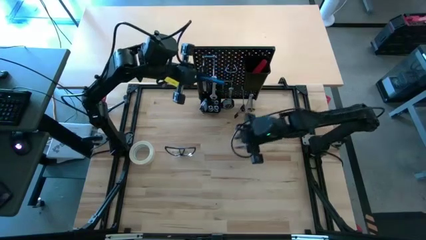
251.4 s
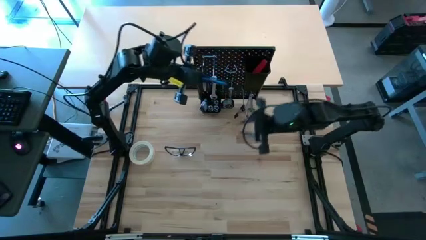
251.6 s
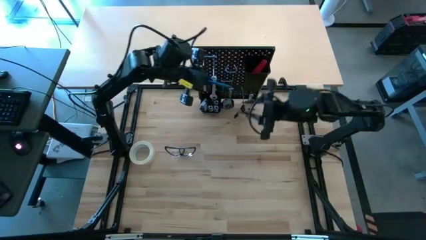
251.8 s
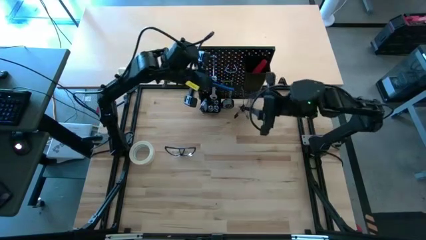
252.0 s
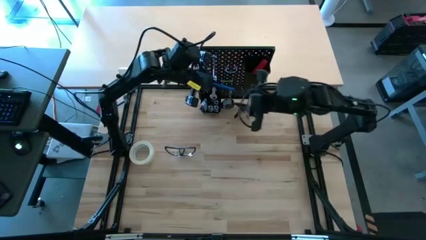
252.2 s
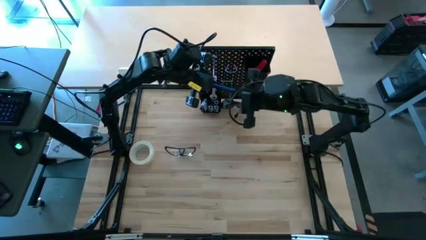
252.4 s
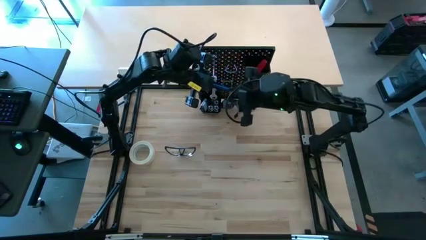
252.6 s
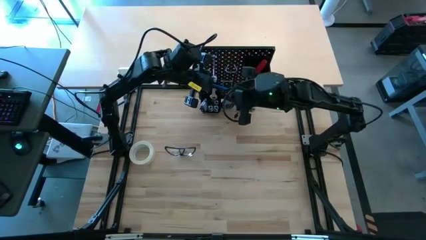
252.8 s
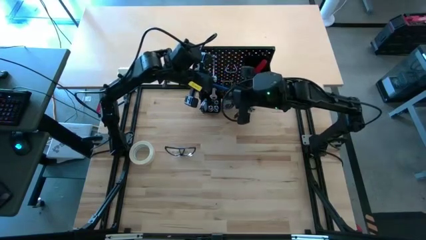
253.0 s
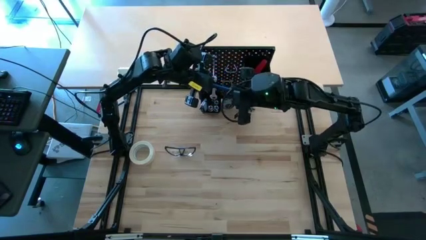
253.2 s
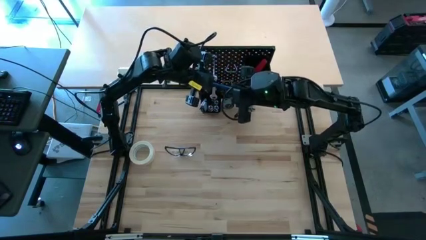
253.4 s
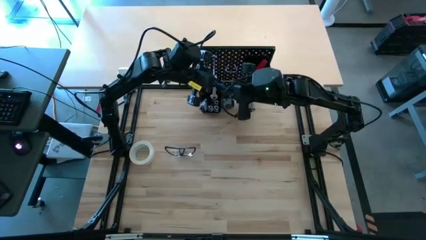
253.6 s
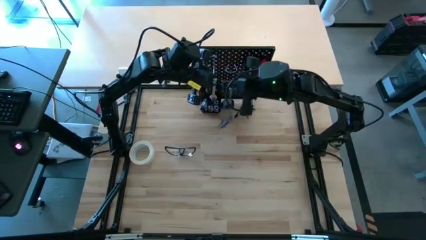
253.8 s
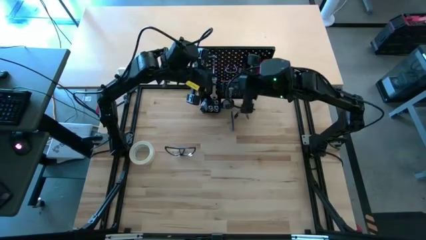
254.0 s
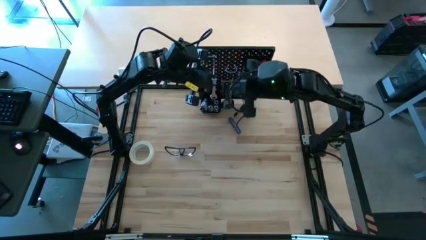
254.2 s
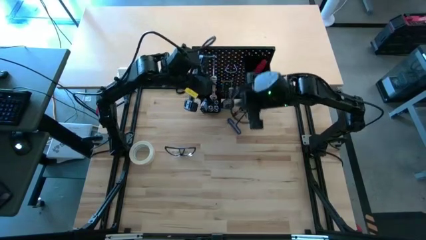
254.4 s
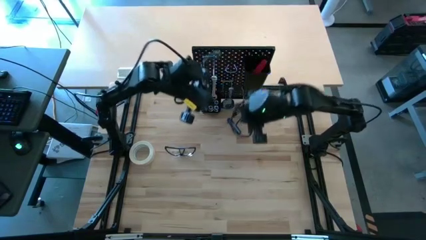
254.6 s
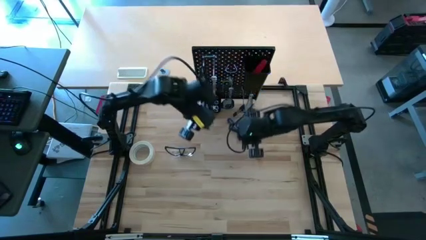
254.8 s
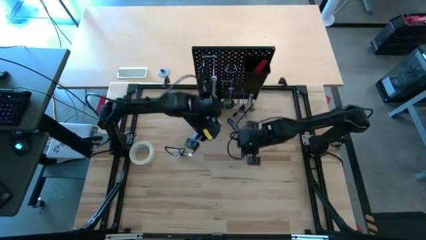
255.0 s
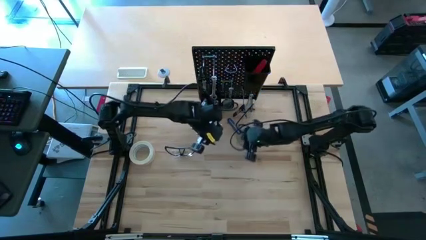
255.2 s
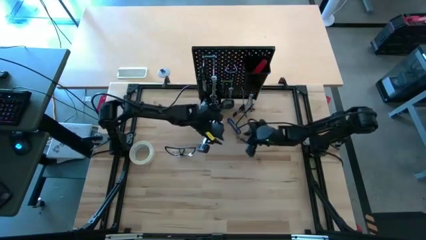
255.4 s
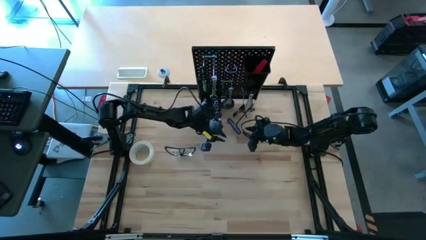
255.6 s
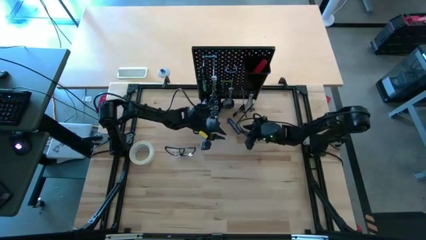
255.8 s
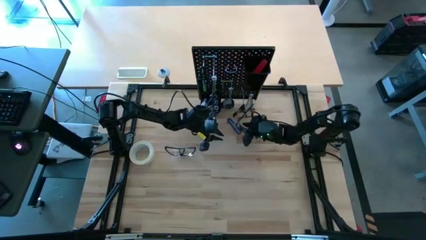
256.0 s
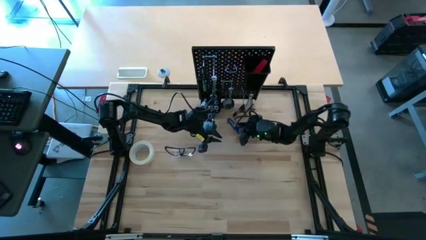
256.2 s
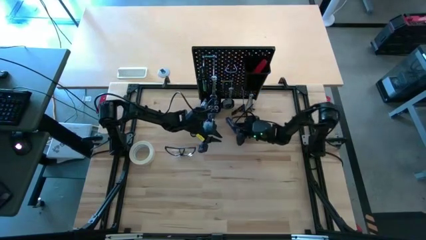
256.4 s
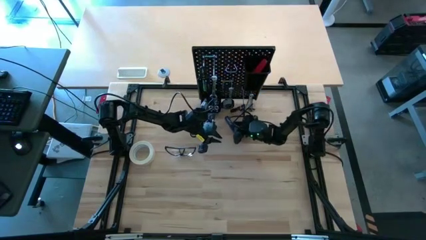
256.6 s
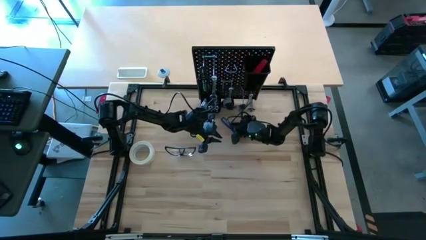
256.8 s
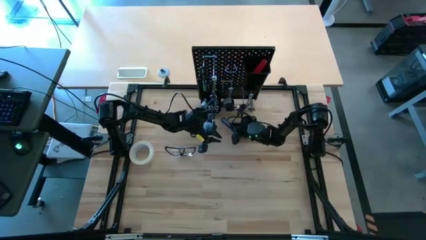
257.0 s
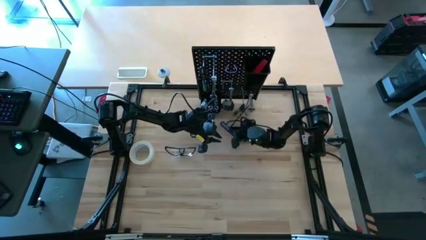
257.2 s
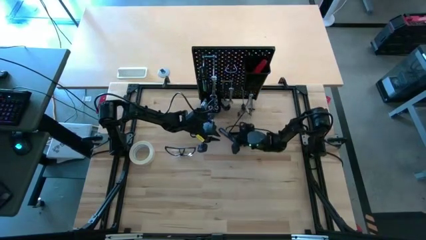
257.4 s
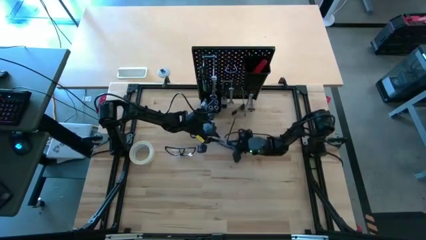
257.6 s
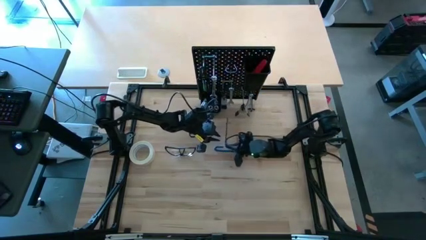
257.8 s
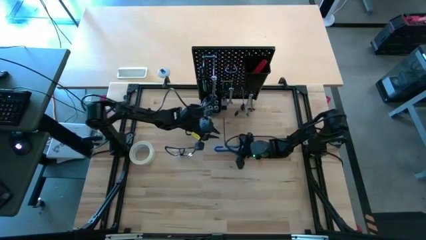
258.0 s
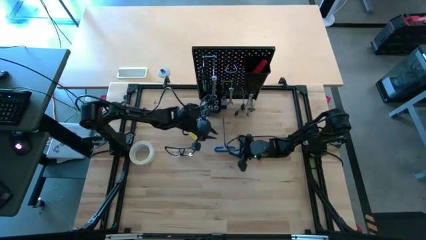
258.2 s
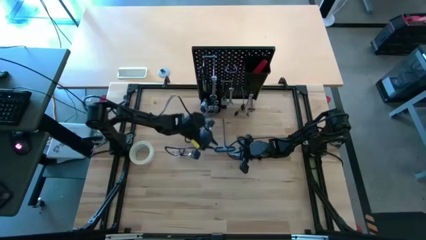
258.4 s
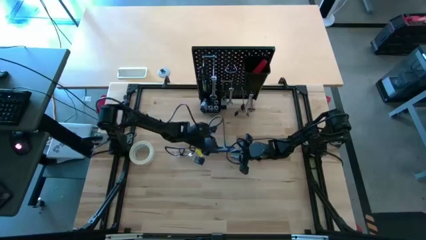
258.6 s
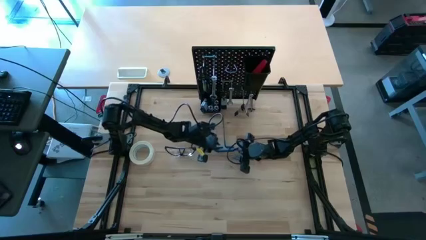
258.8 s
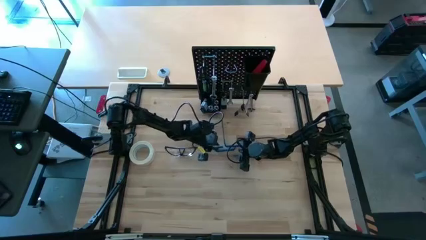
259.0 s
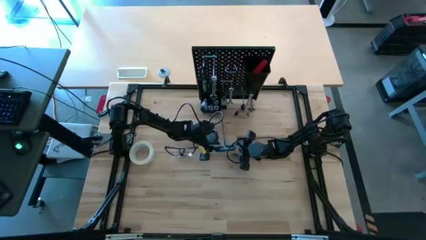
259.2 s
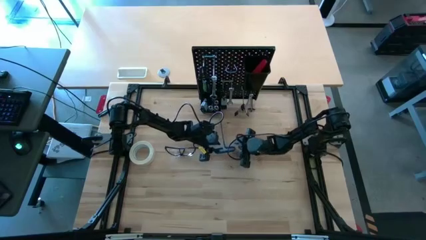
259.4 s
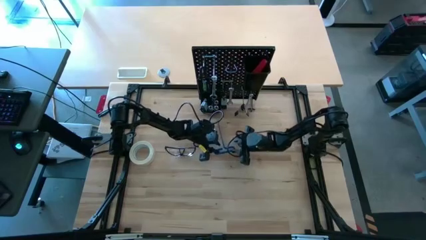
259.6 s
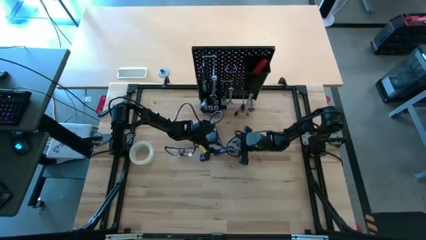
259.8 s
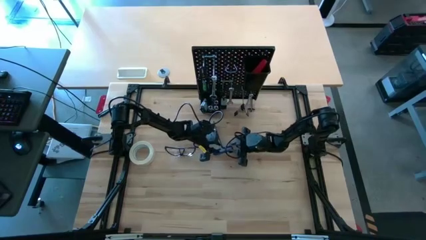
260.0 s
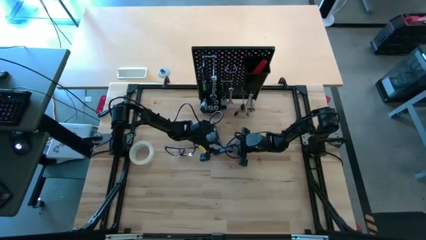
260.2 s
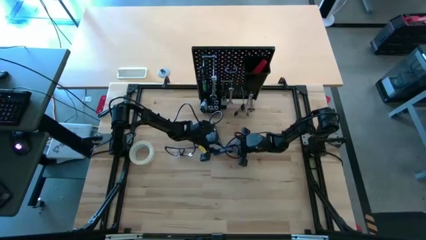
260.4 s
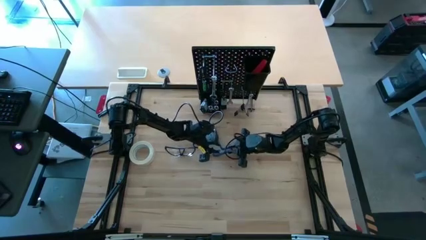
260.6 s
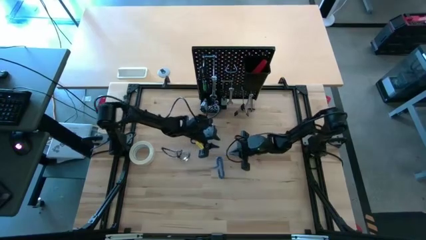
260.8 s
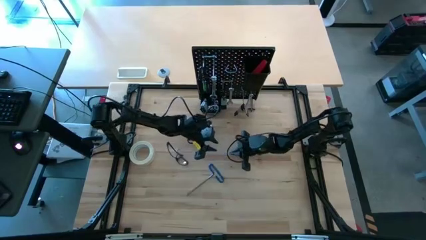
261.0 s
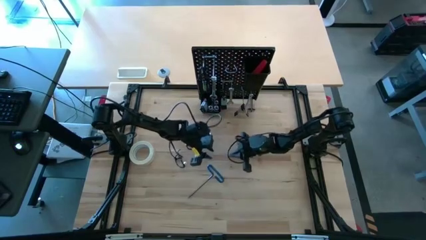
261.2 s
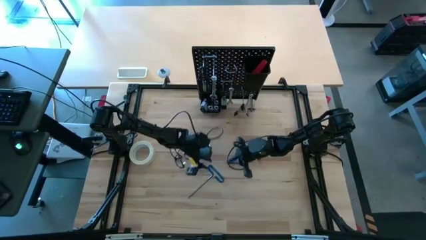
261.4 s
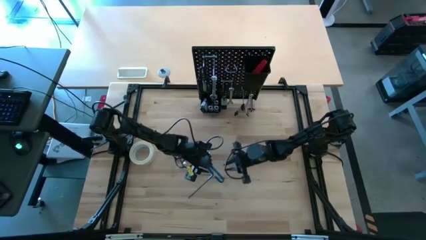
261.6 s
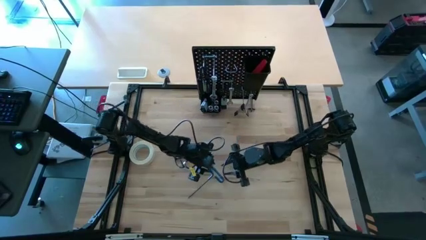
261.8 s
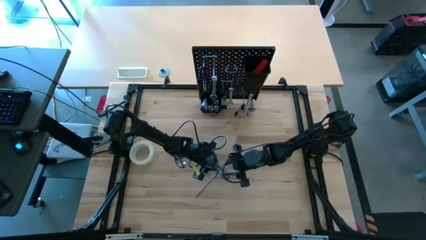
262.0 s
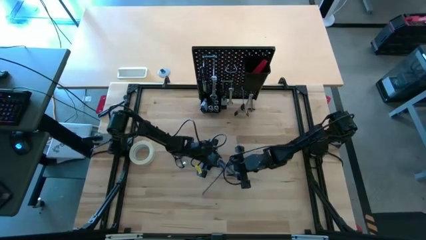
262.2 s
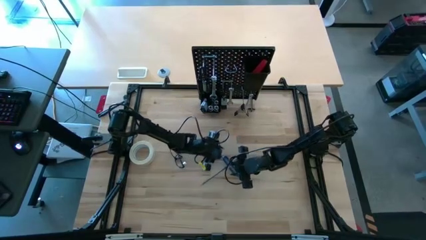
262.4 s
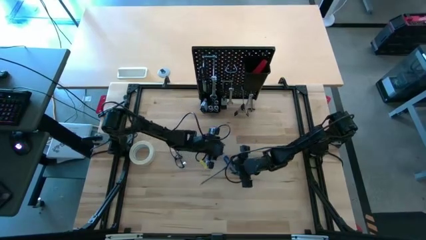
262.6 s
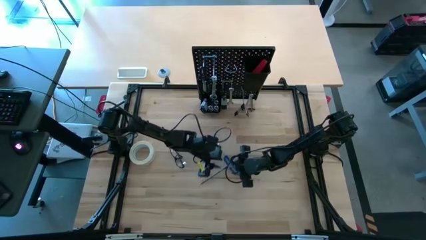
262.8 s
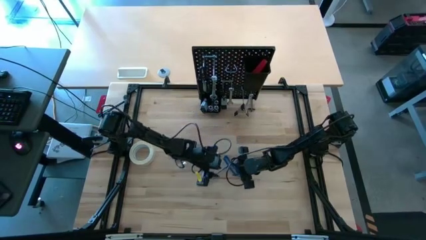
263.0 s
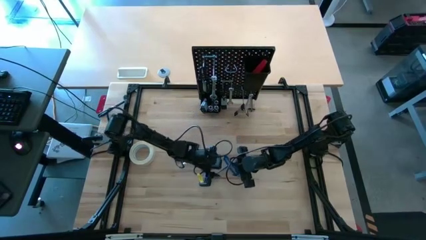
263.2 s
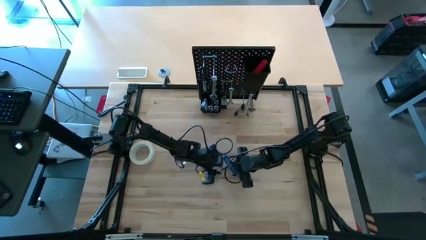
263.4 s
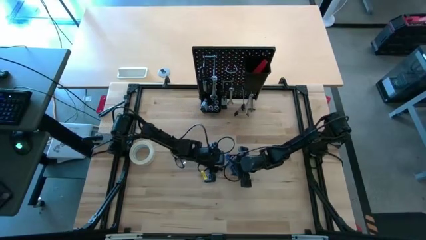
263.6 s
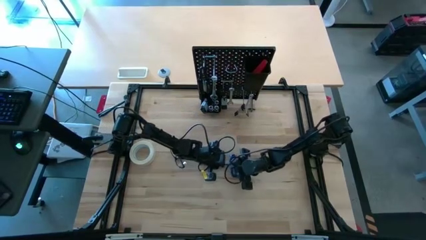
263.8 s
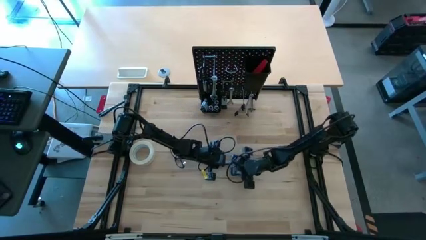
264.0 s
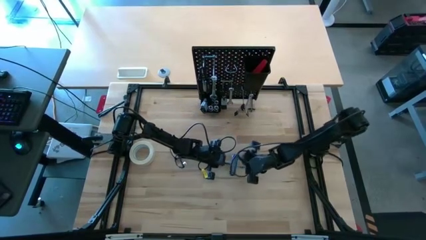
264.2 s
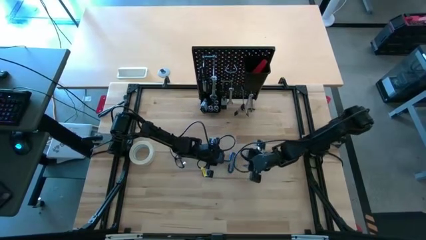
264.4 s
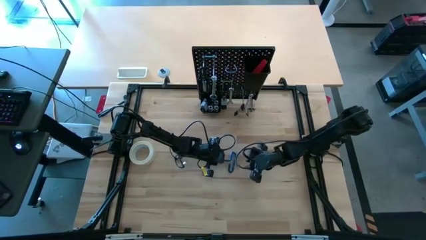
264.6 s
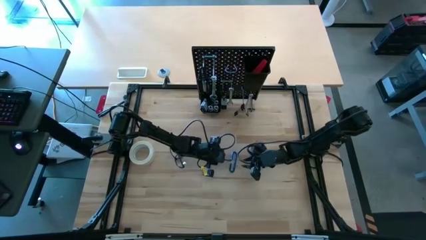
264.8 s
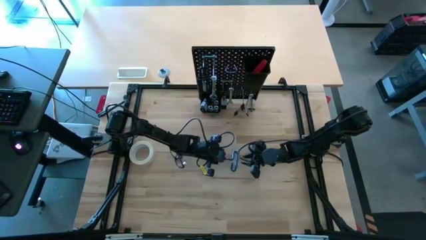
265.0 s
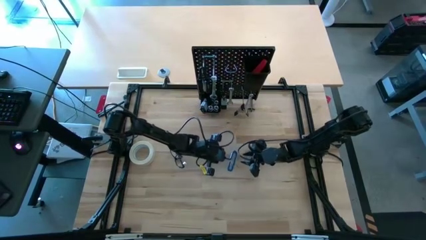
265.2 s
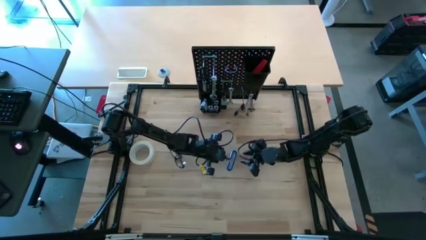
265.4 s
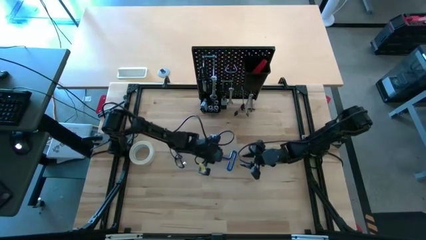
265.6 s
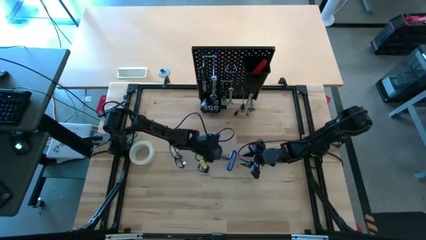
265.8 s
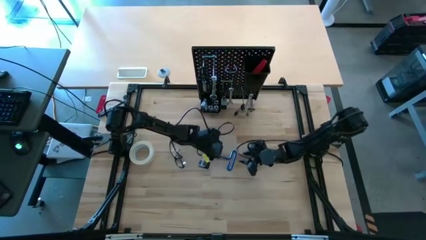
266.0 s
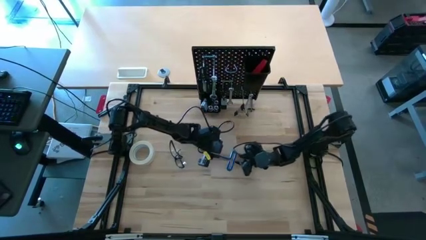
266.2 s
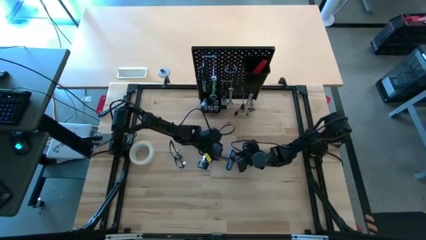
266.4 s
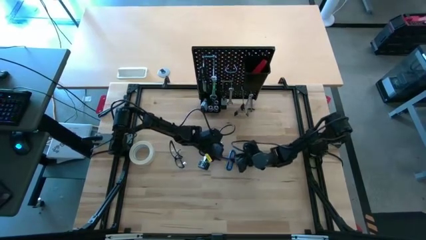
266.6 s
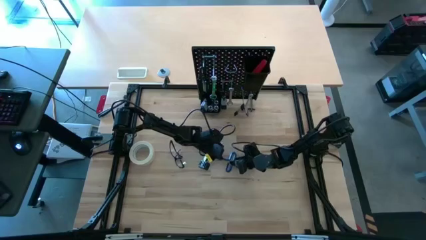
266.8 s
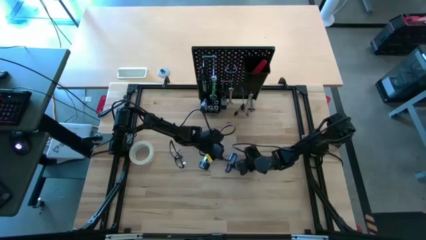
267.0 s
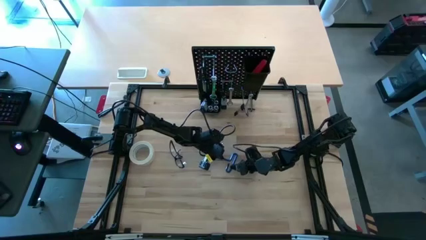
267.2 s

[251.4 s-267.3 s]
Task: Hang tools onto peg board
Put the pick tool into the black bin on the peg board
